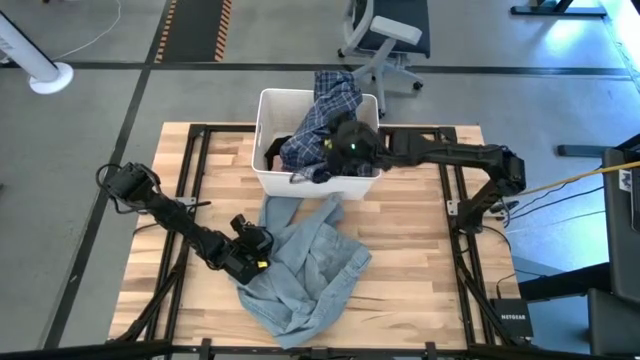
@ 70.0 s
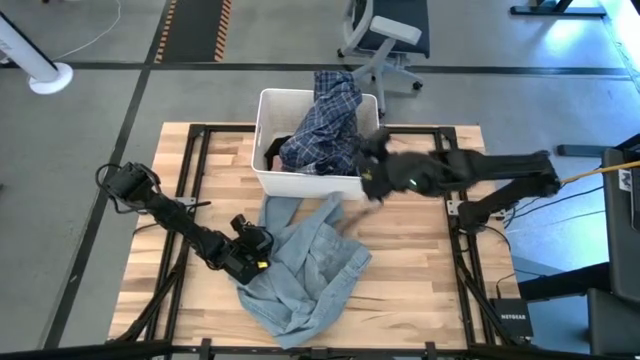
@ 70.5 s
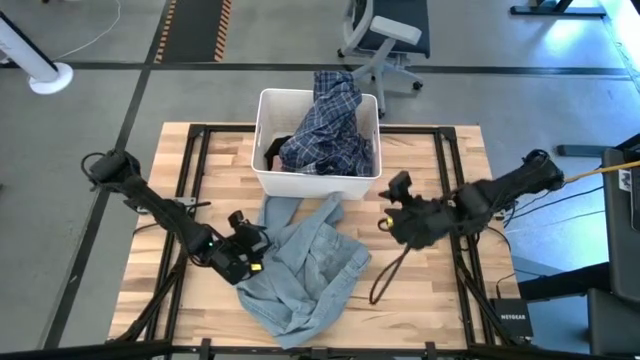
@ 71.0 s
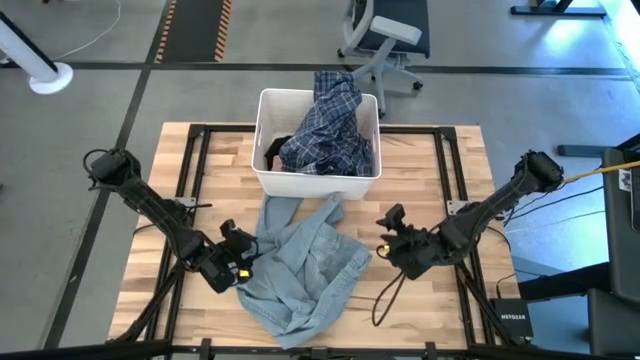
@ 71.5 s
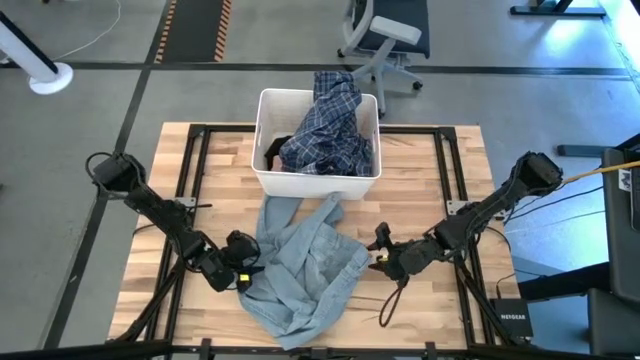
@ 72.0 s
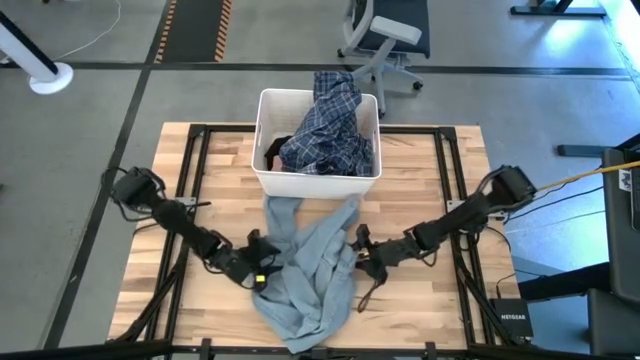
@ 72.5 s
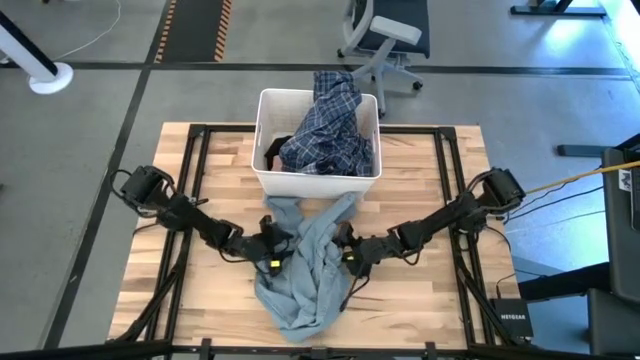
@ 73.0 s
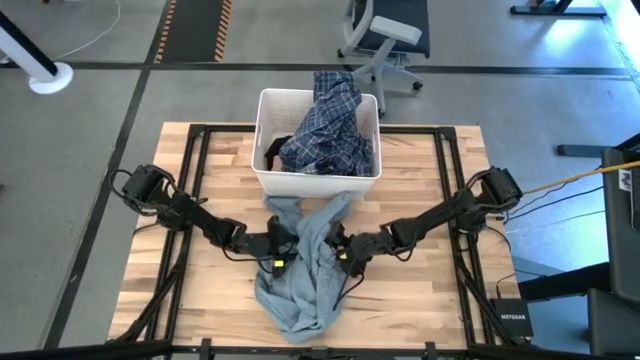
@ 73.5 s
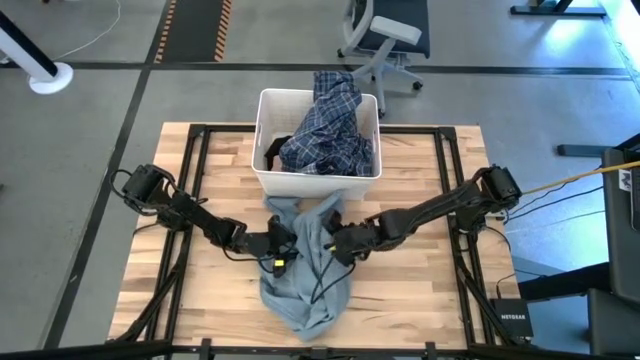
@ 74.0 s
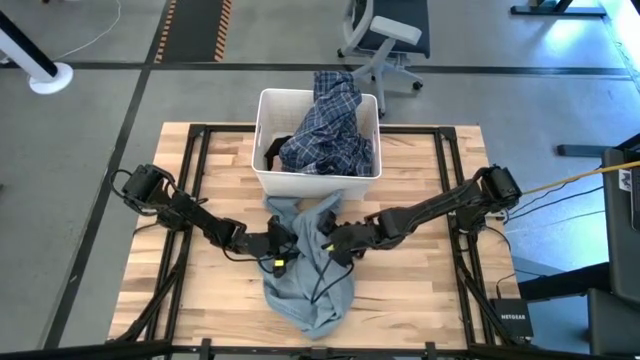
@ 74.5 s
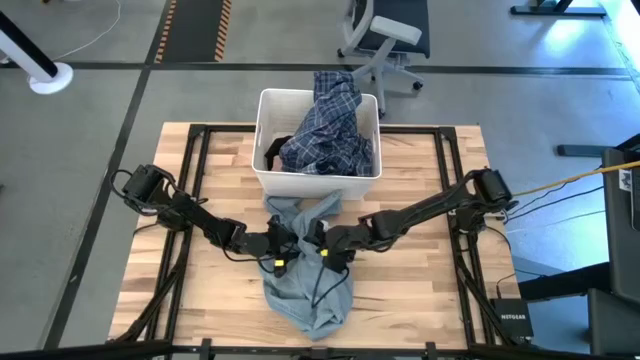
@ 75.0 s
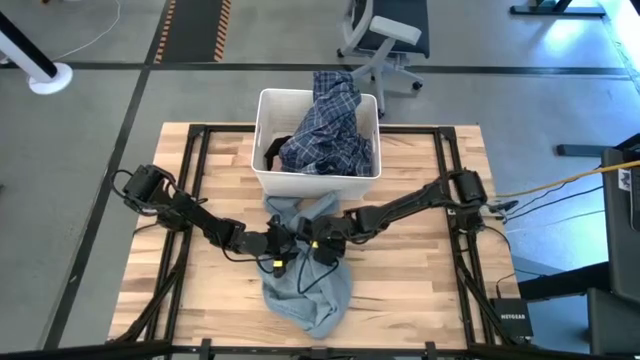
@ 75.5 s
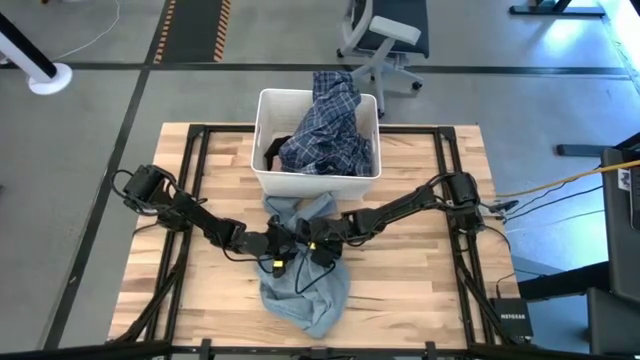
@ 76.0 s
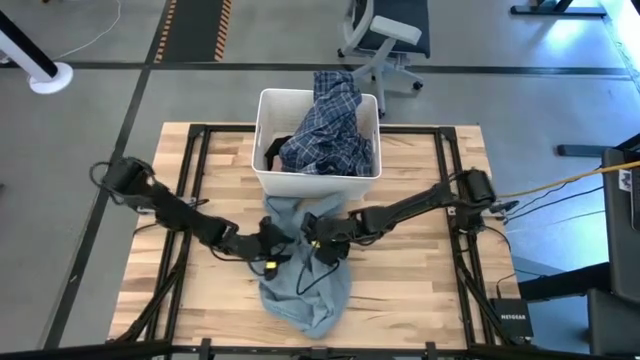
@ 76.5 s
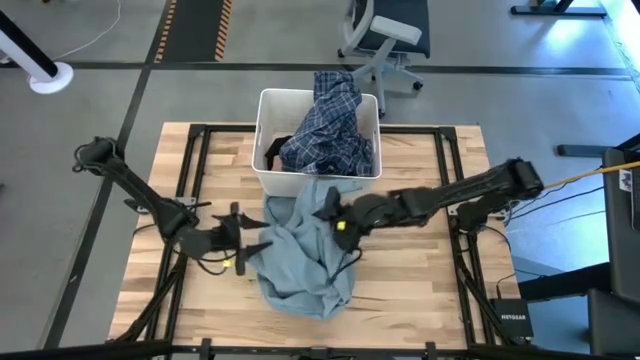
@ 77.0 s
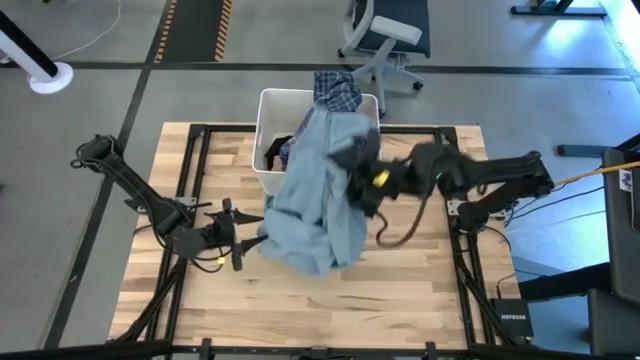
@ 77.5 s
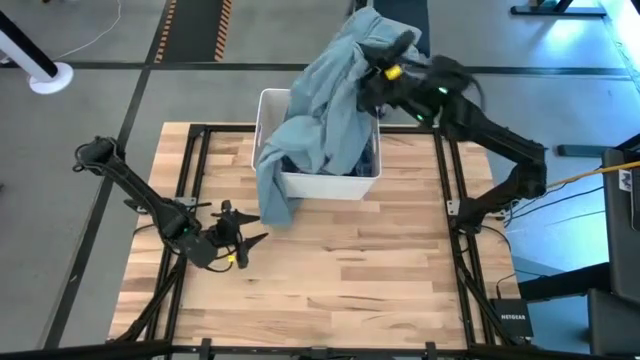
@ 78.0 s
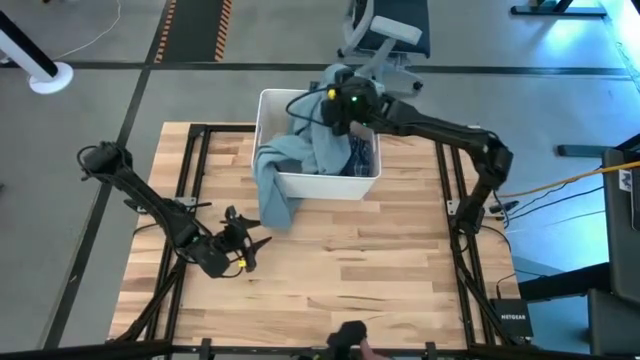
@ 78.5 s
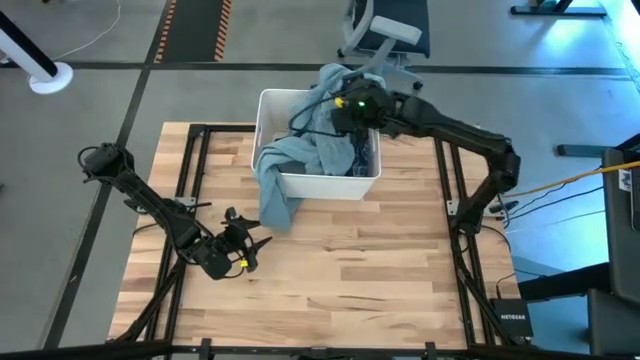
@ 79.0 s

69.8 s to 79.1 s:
Task: Sort clothes
Put the blue jeans into the white laundry bin

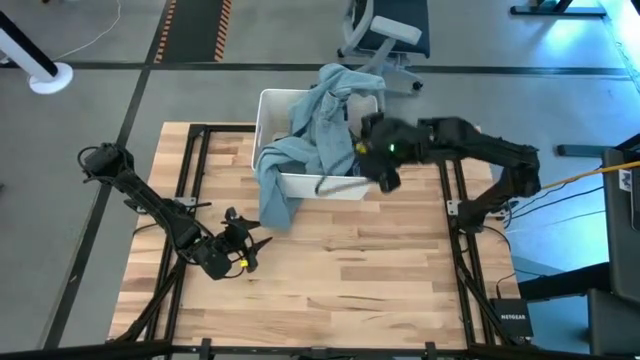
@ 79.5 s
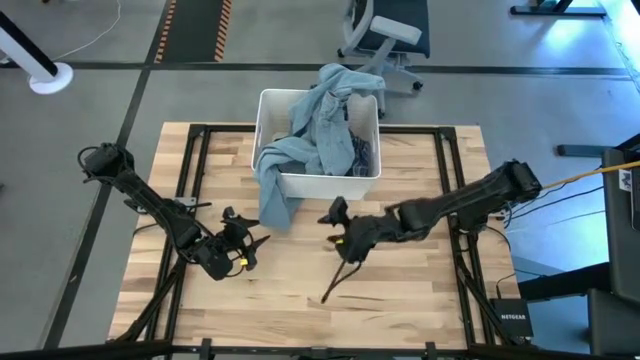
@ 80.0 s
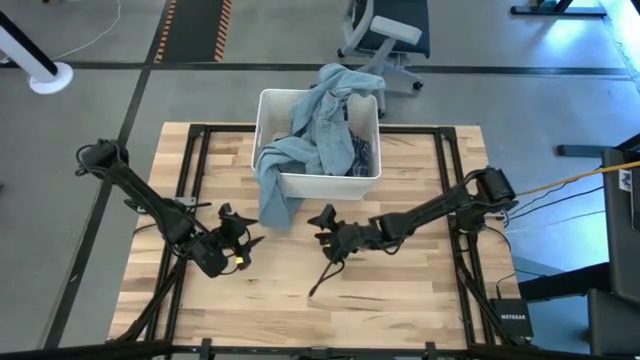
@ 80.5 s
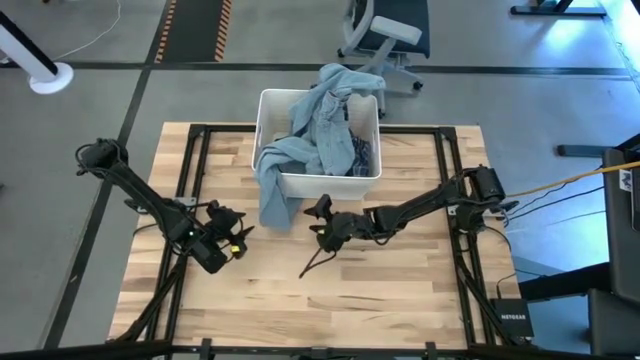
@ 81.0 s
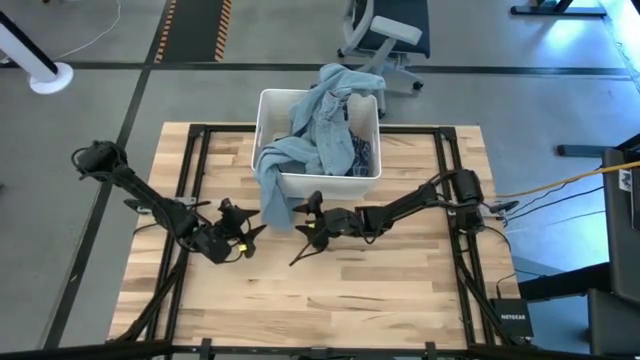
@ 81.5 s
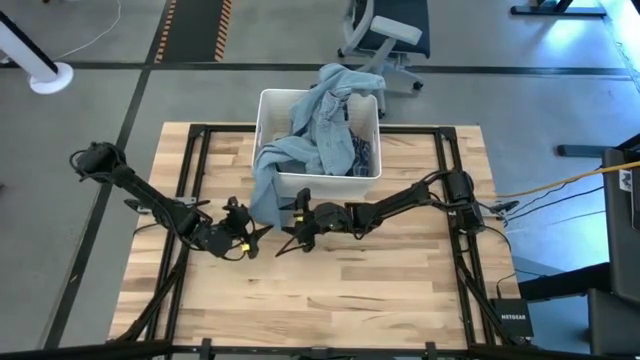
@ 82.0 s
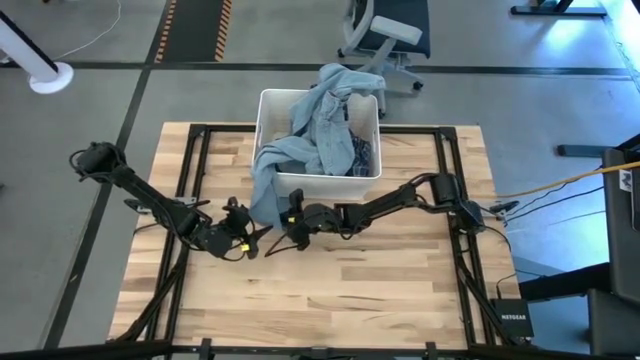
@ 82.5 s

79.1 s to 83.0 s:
Put the blue jeans into the white laundry bin

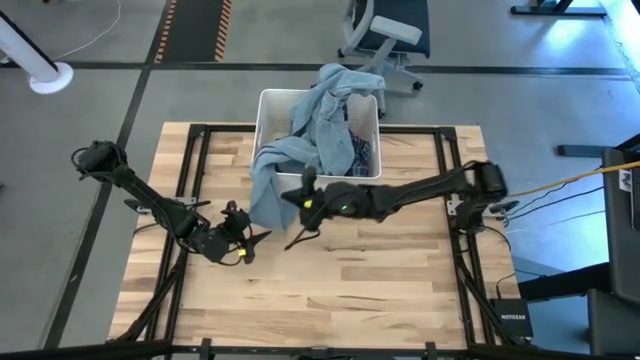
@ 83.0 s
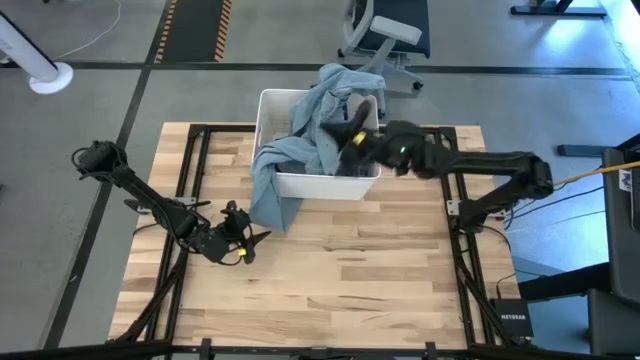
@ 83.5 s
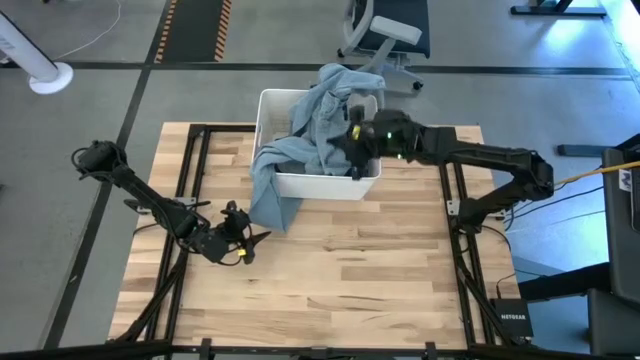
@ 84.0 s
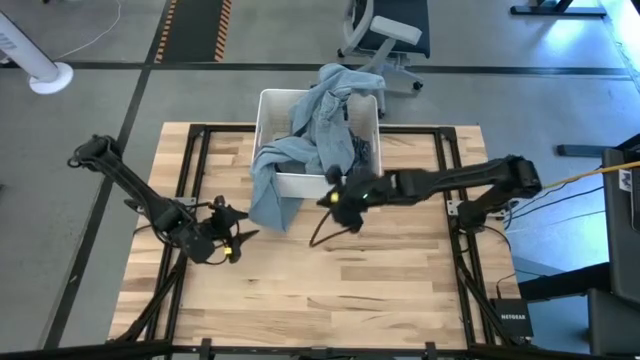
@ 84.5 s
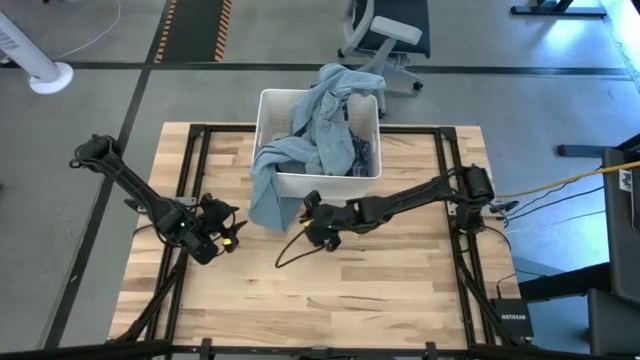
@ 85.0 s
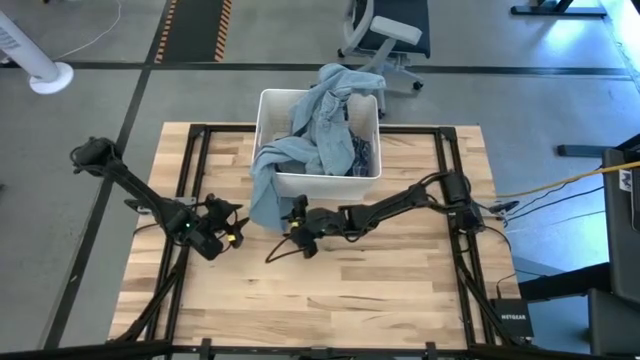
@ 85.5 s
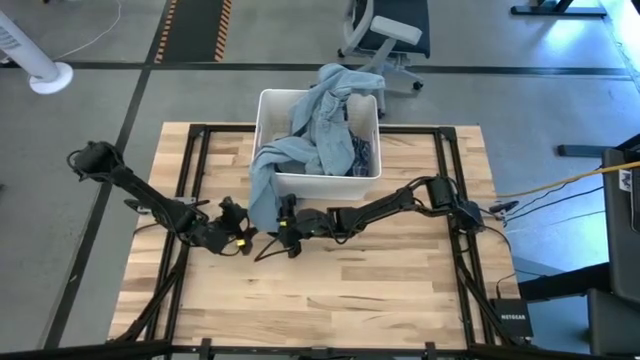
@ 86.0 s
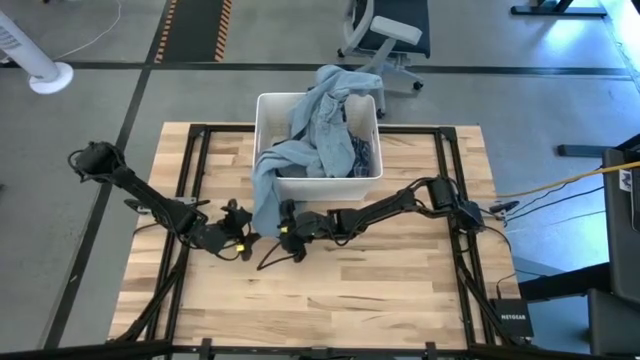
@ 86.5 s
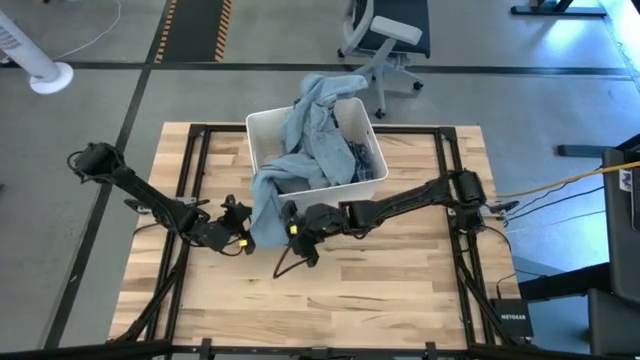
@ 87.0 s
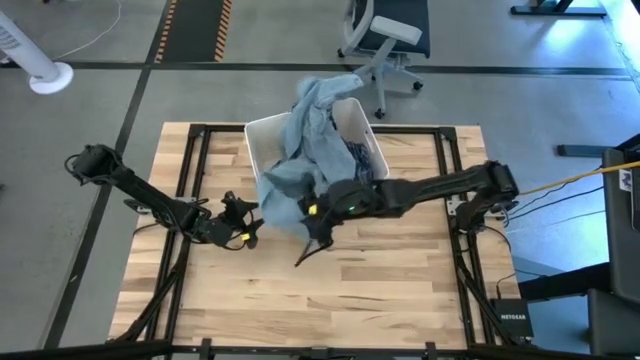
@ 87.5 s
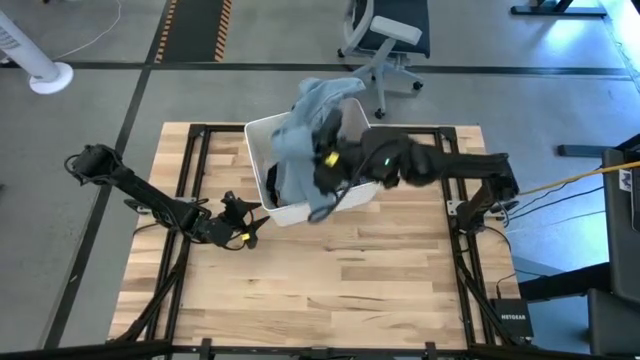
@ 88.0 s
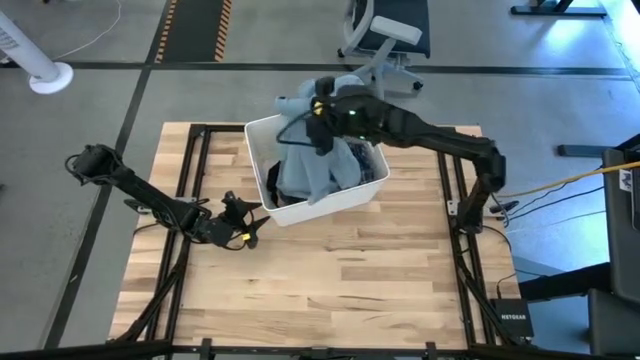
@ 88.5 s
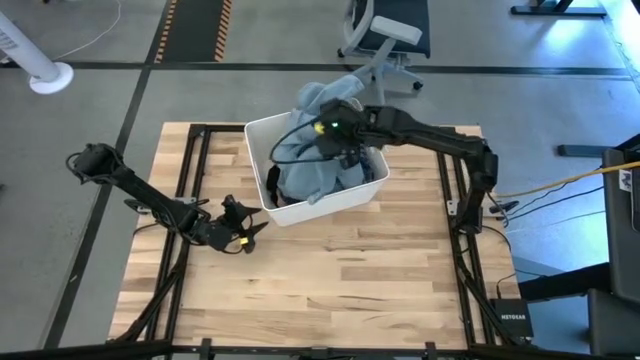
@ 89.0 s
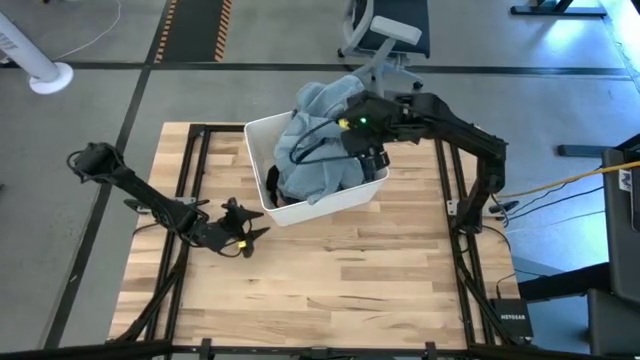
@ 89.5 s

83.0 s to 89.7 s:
Put the blue jeans into the white laundry bin

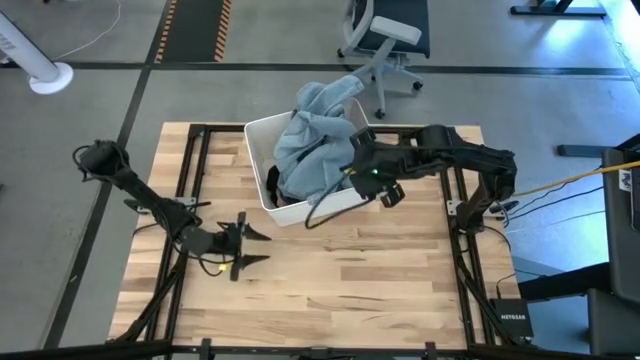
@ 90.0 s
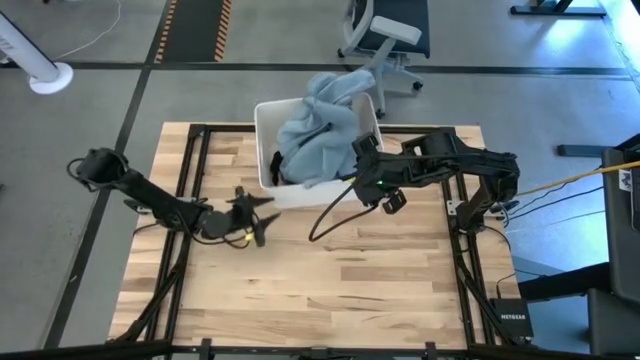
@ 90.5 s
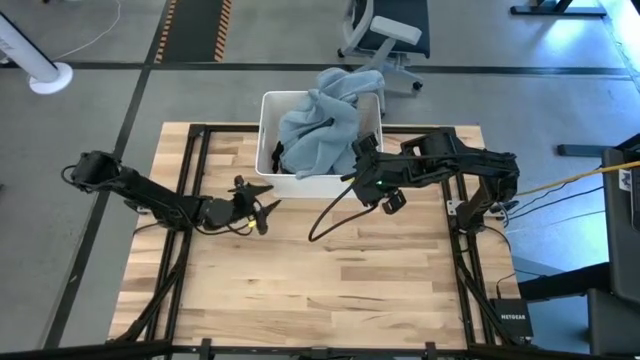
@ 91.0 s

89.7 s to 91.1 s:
Adjust the white laundry bin

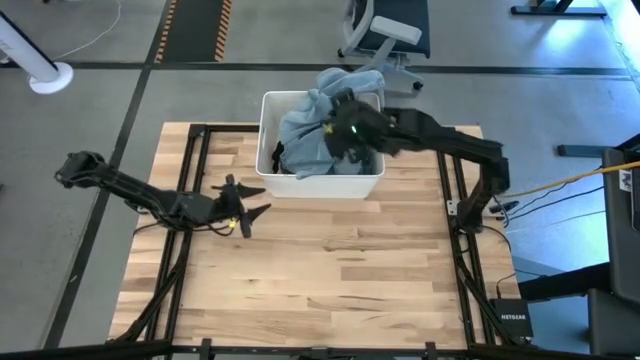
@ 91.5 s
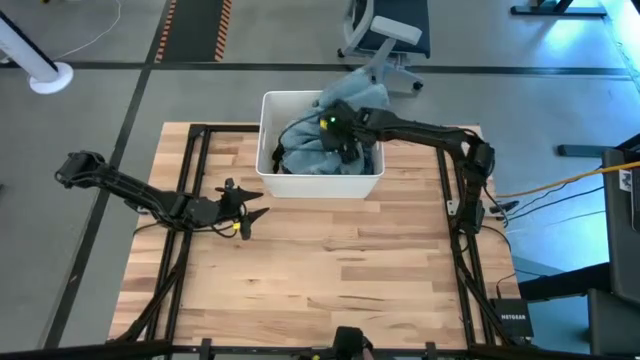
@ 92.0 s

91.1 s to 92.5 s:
Adjust the blue jeans in the white laundry bin
